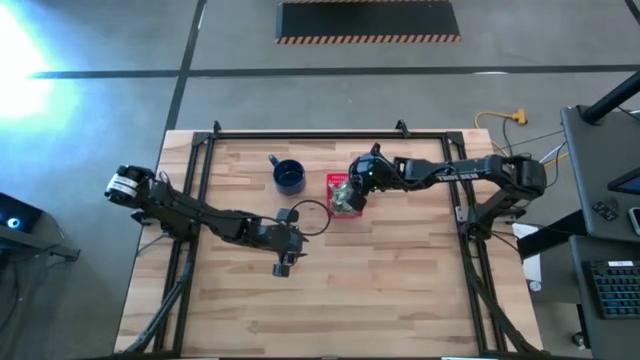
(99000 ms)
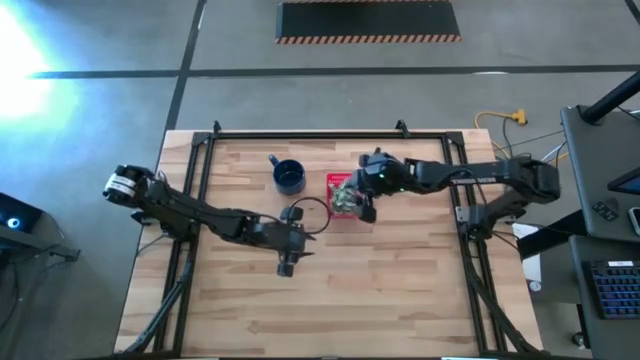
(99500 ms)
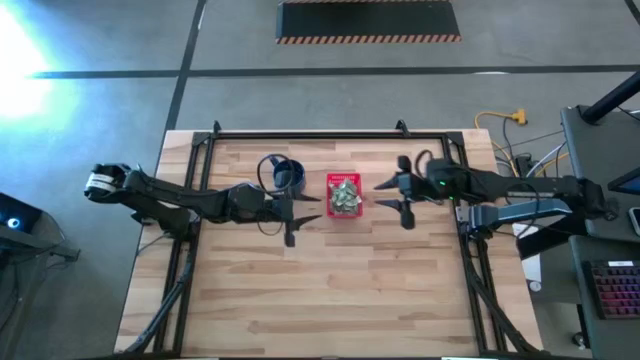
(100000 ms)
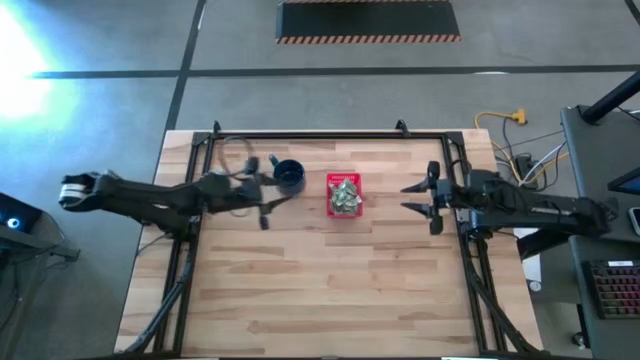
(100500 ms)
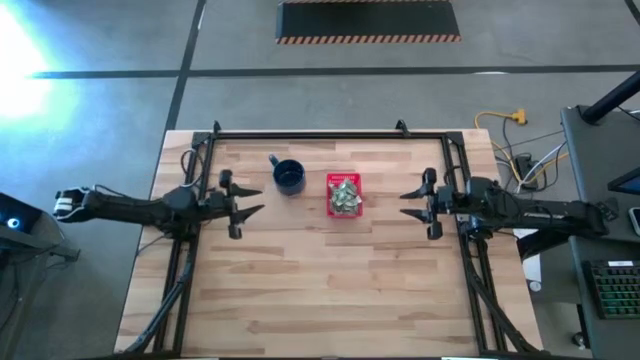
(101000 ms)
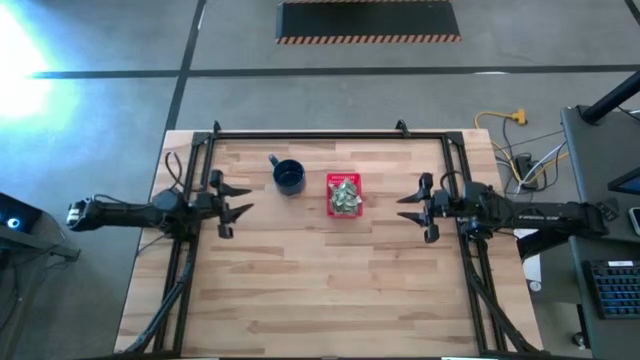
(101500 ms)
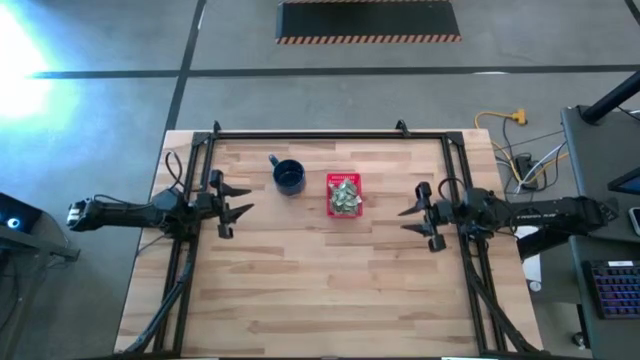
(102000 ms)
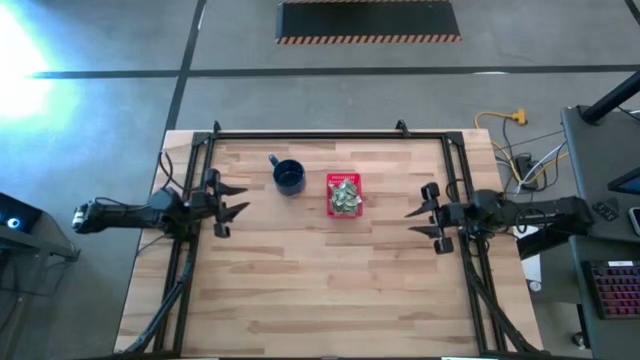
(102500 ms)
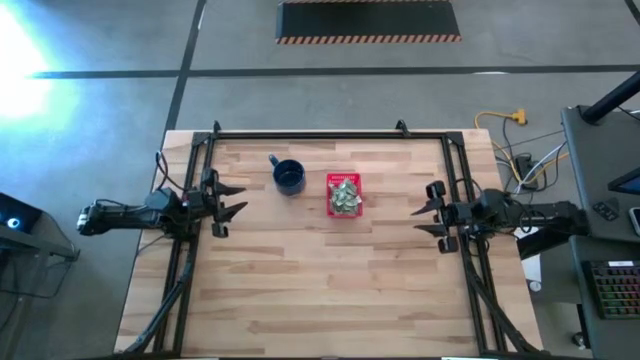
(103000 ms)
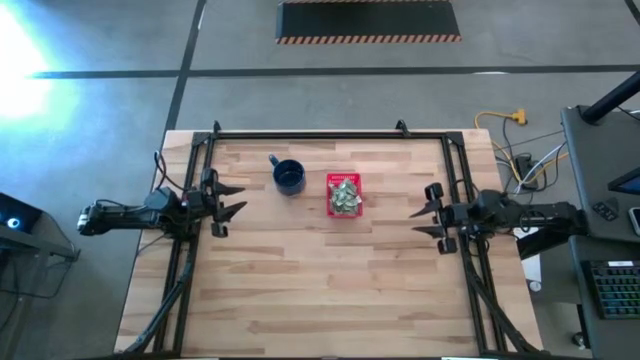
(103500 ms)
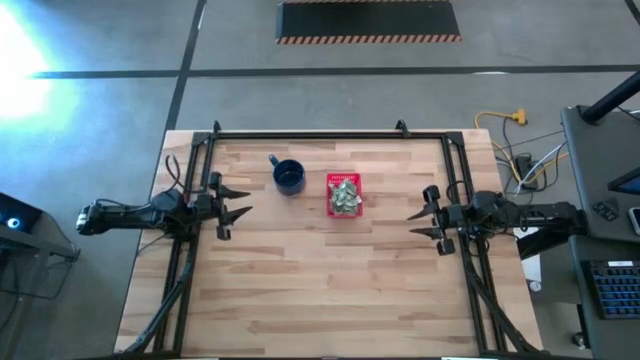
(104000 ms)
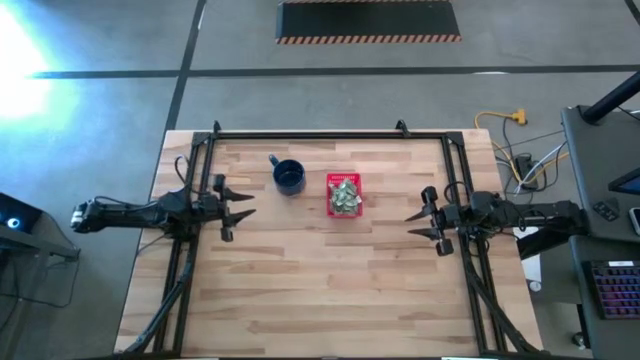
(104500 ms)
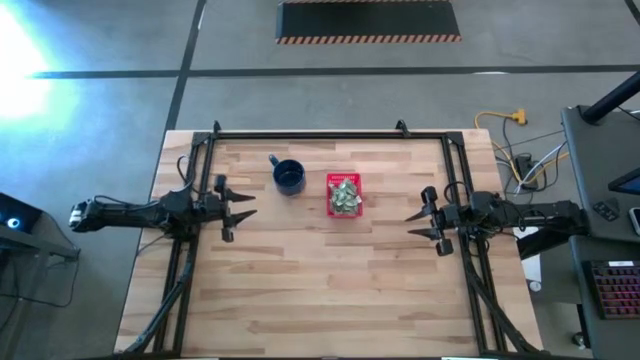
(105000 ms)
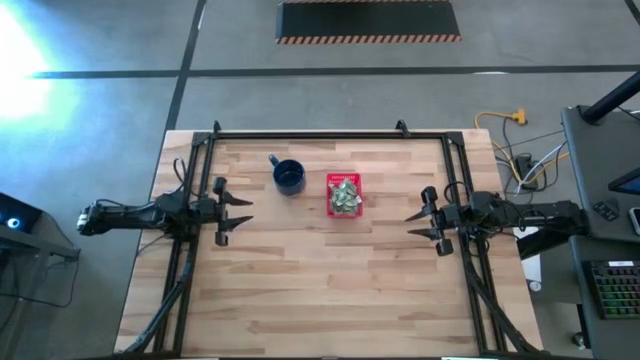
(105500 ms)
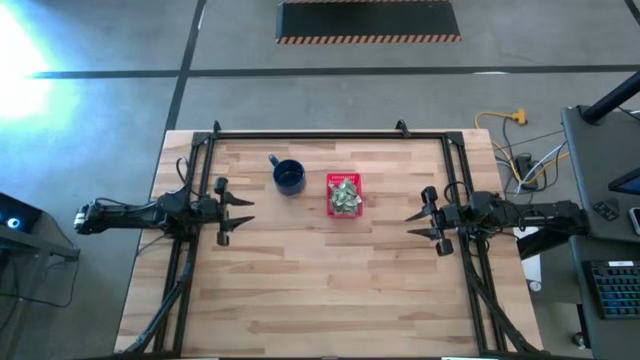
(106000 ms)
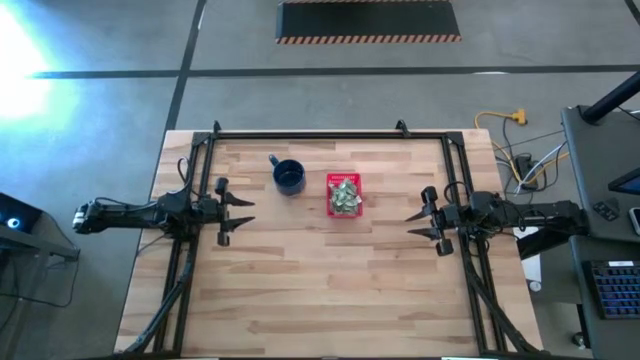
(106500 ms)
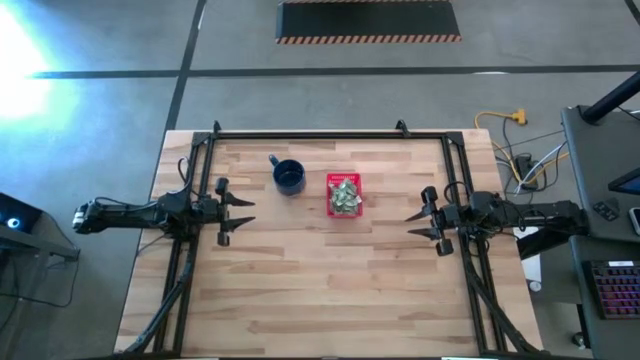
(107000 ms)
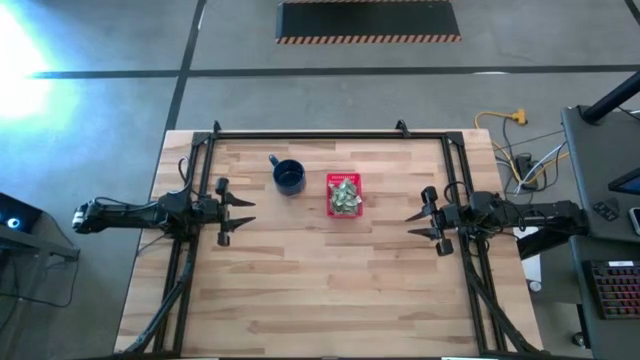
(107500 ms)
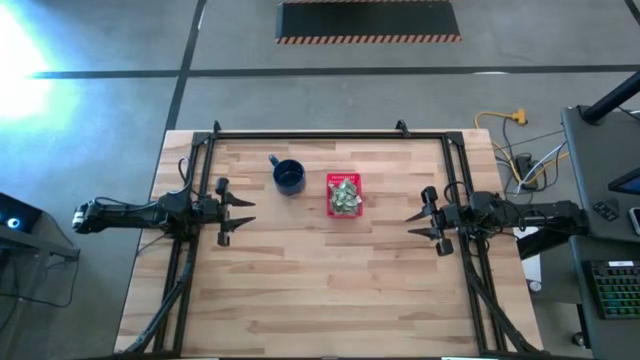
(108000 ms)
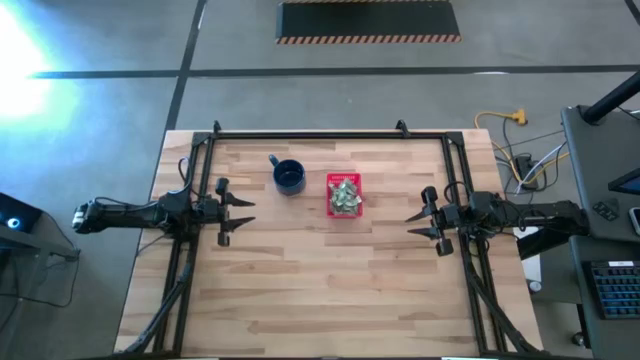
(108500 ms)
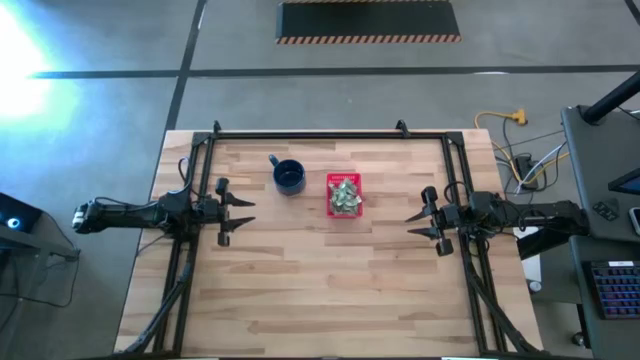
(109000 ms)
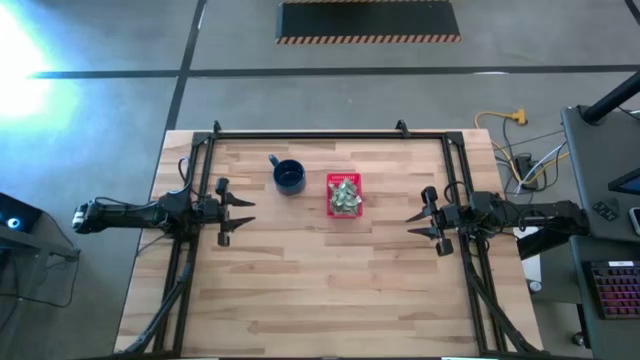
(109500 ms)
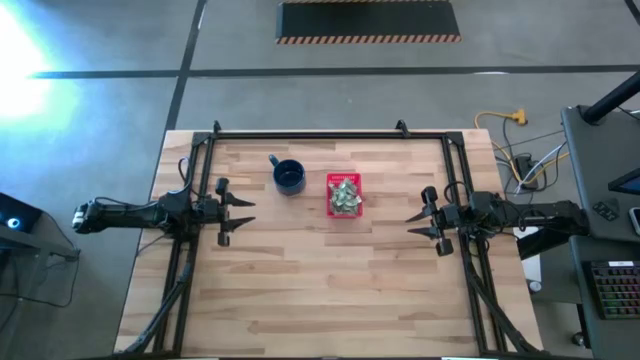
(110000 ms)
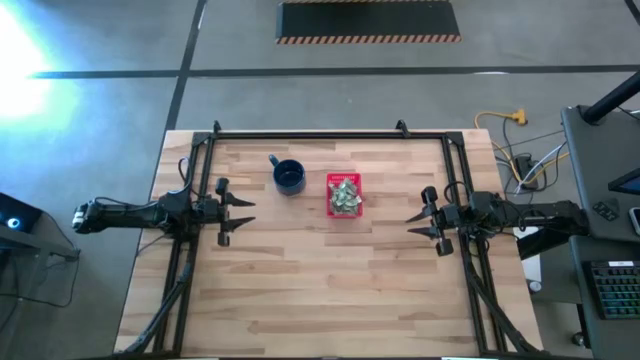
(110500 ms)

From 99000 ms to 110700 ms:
Task: Pick and place items into bin
Return to Home Position

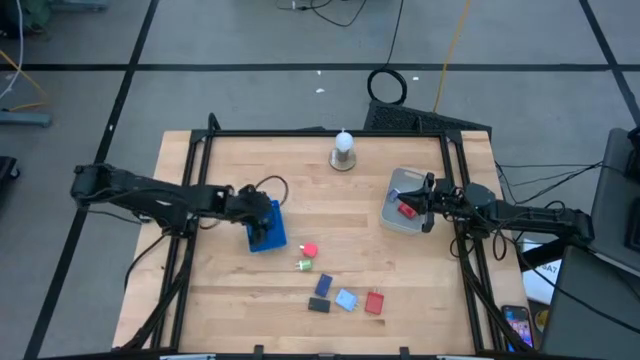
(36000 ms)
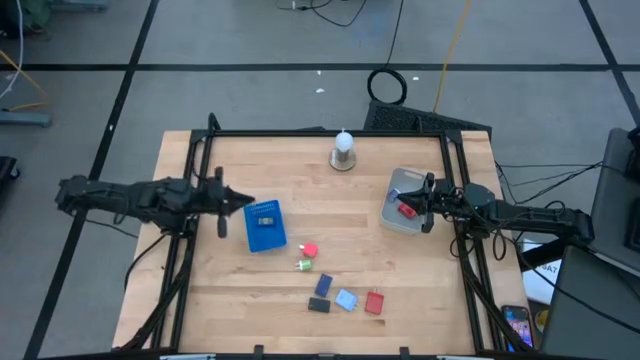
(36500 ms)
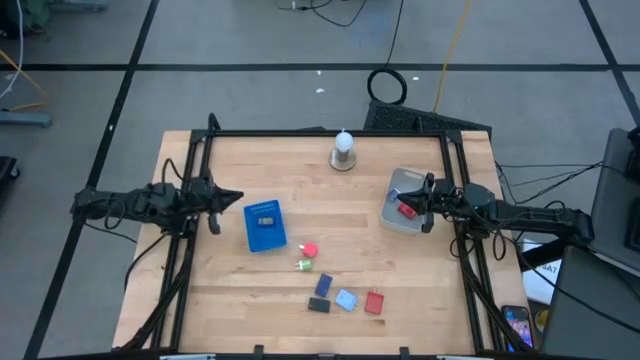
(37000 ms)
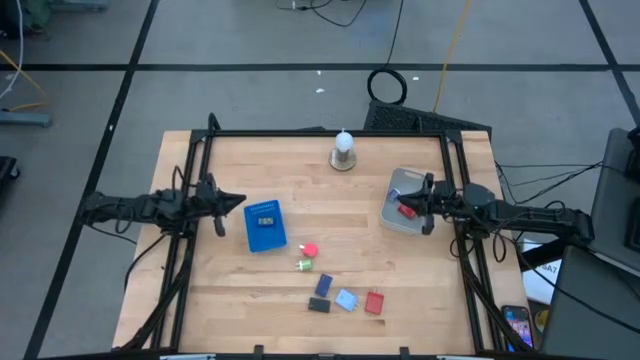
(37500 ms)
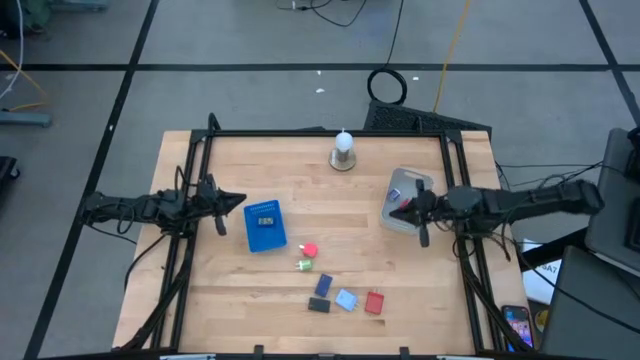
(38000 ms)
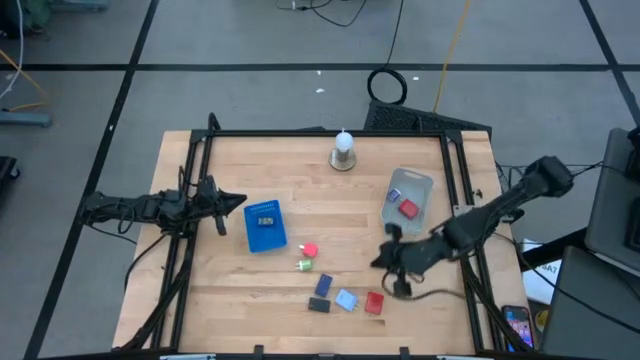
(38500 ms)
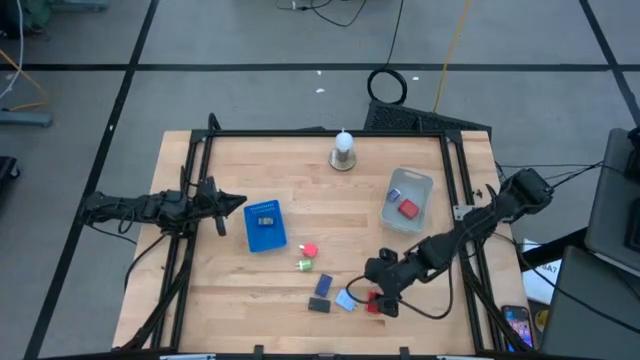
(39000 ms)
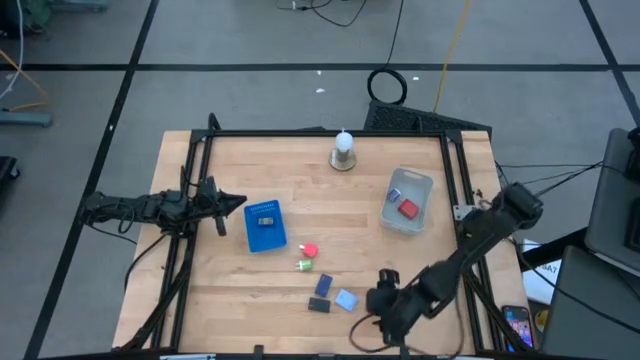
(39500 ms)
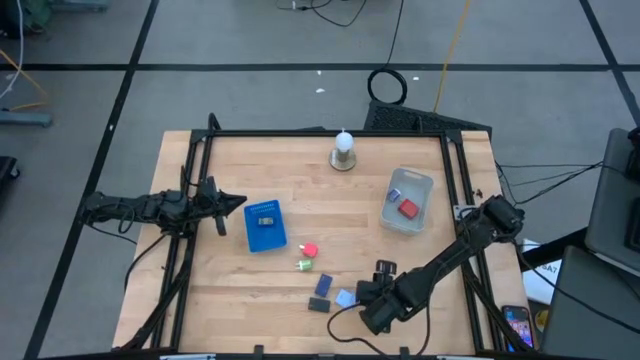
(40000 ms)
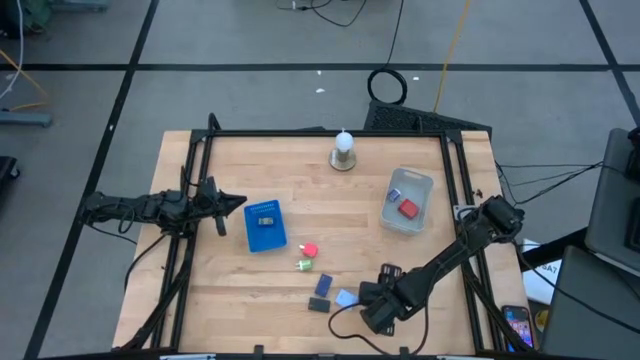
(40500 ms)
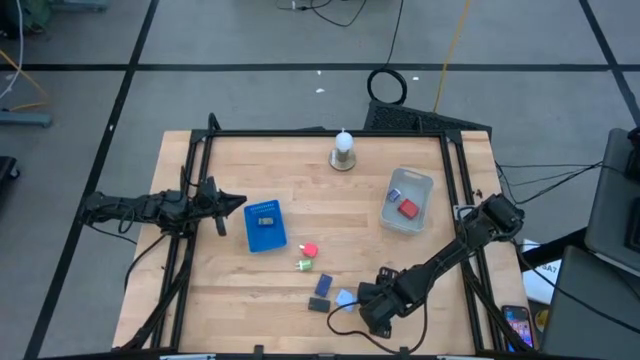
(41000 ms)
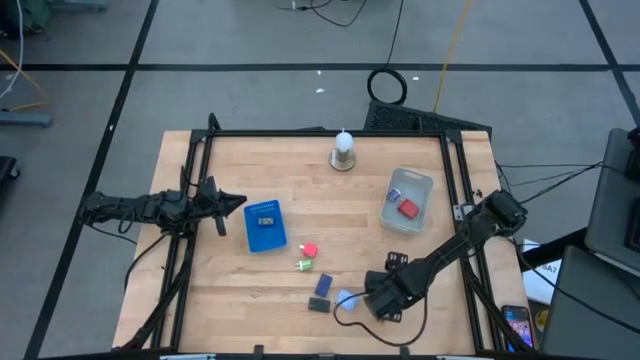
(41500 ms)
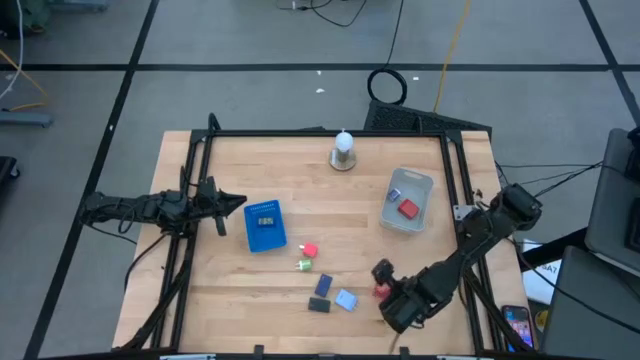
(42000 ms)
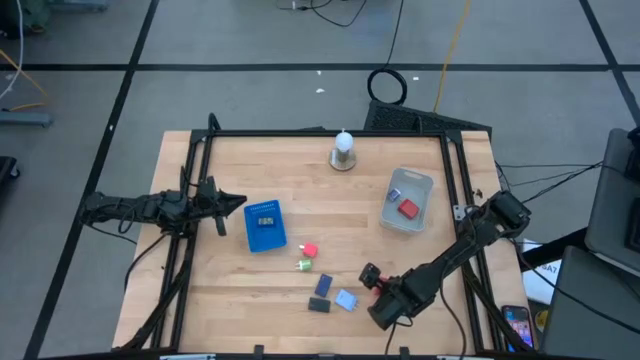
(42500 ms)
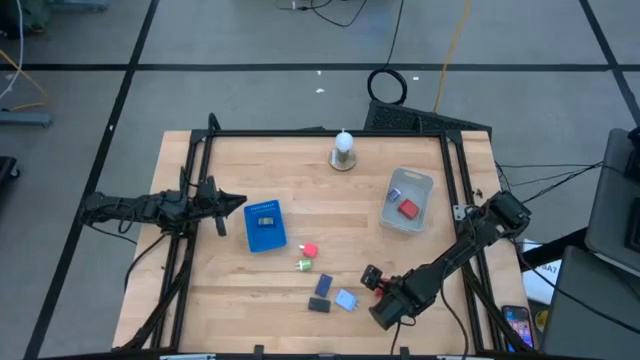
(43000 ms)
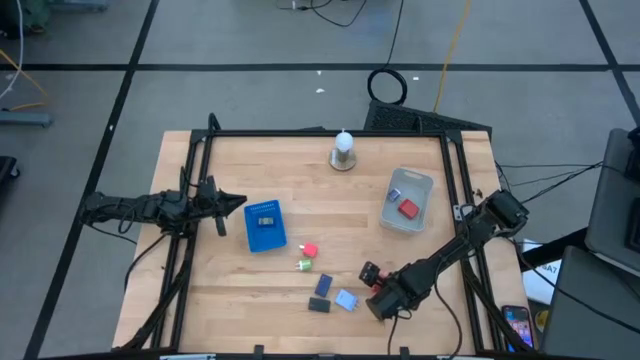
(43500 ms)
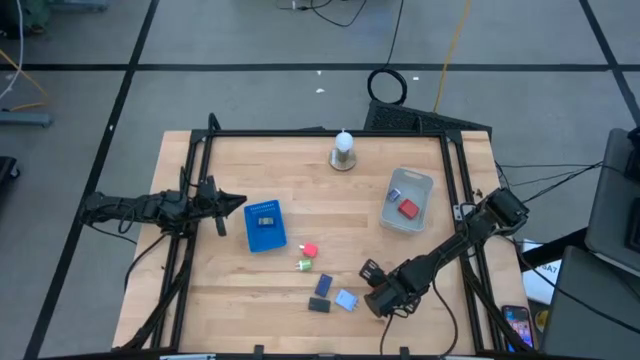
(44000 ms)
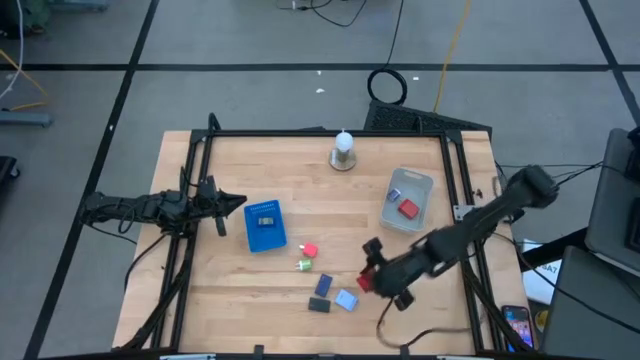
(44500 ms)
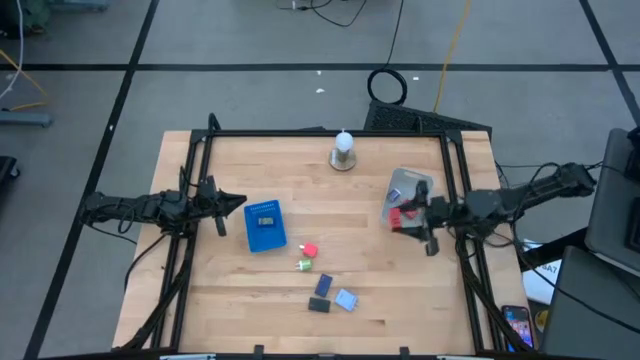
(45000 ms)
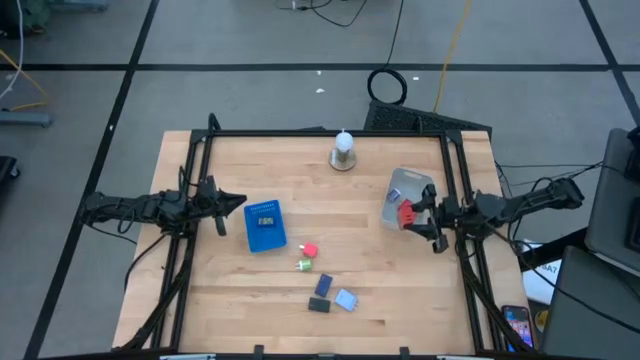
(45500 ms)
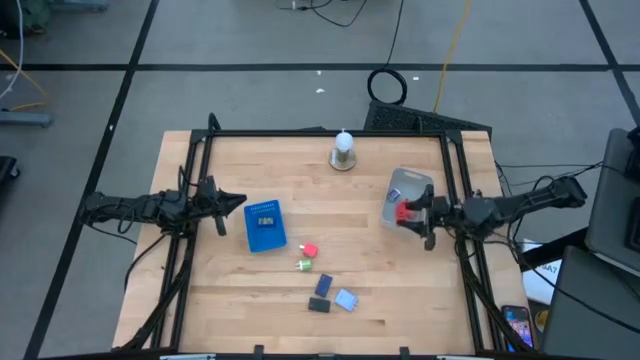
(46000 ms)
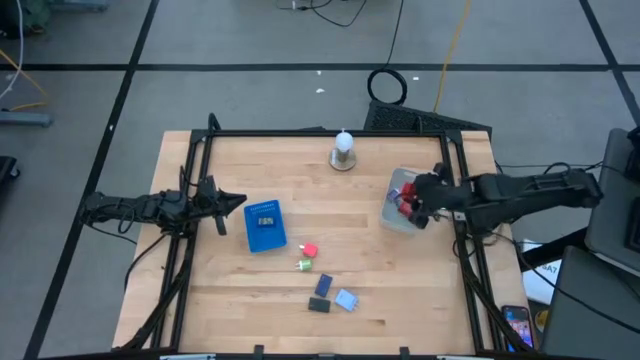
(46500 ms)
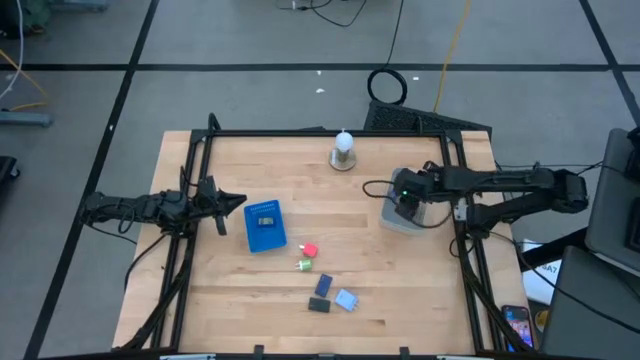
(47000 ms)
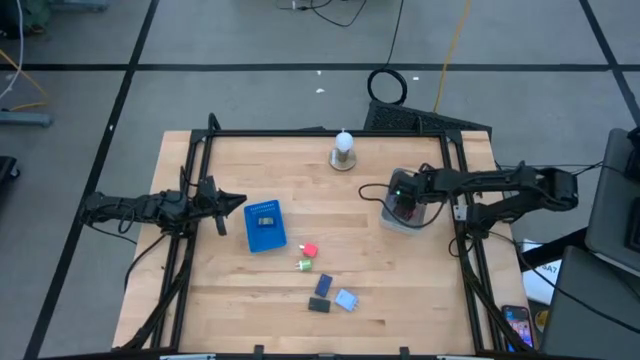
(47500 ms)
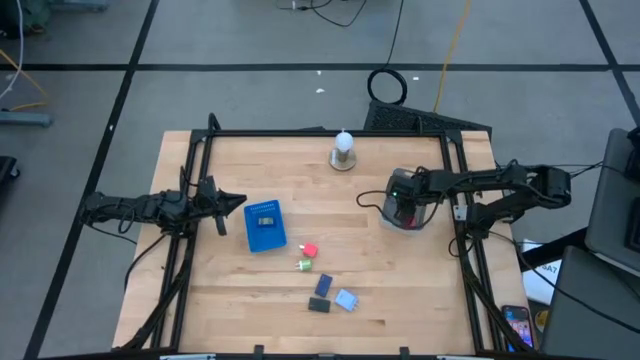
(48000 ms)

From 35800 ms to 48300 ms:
Task: Pick & Place Office items
Put the red charger adapter into the gray bin
